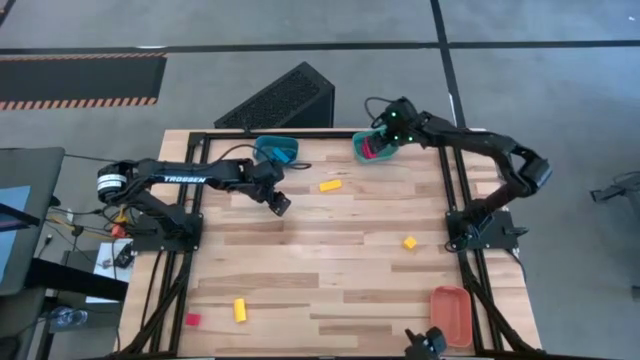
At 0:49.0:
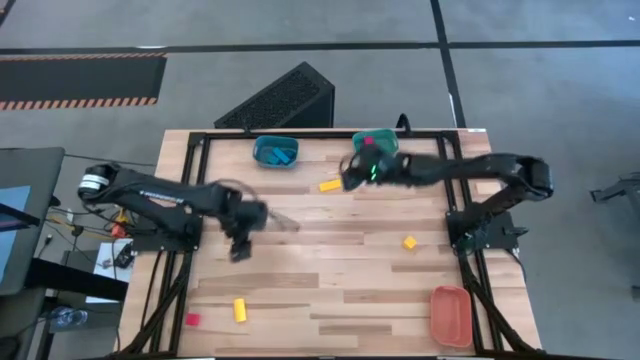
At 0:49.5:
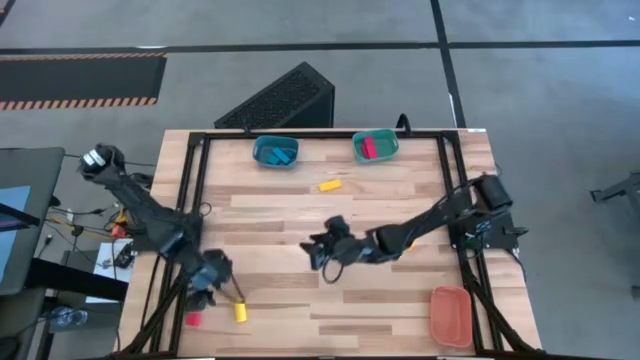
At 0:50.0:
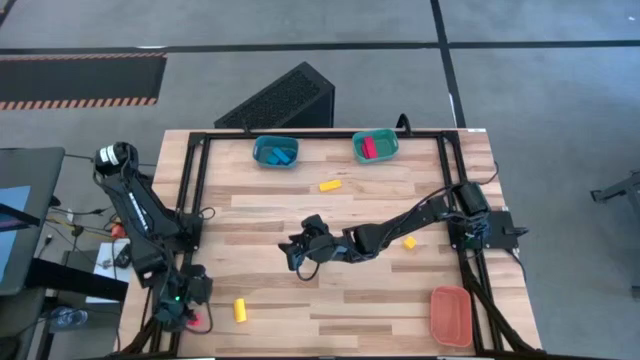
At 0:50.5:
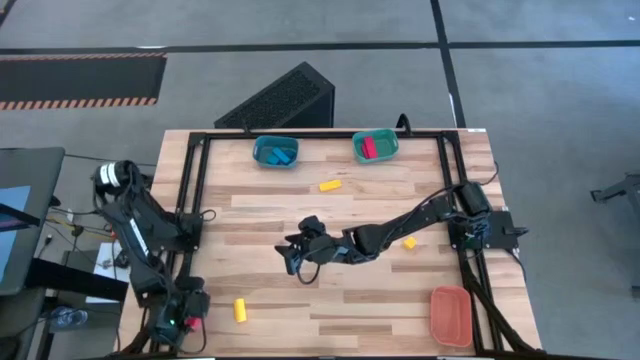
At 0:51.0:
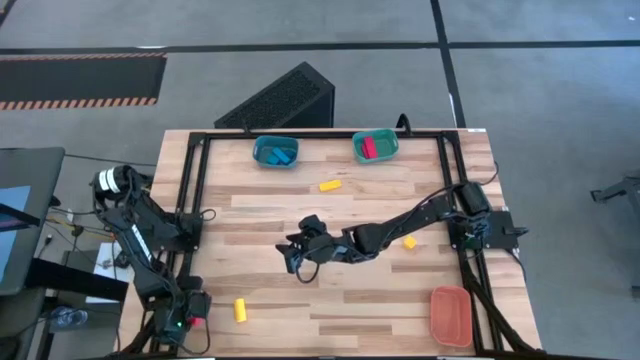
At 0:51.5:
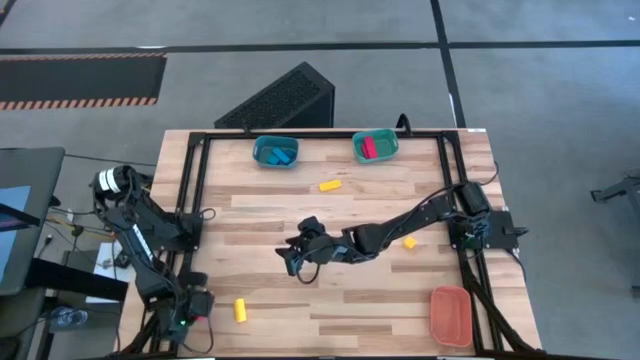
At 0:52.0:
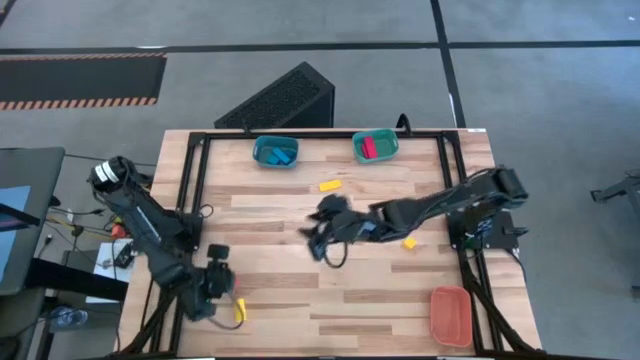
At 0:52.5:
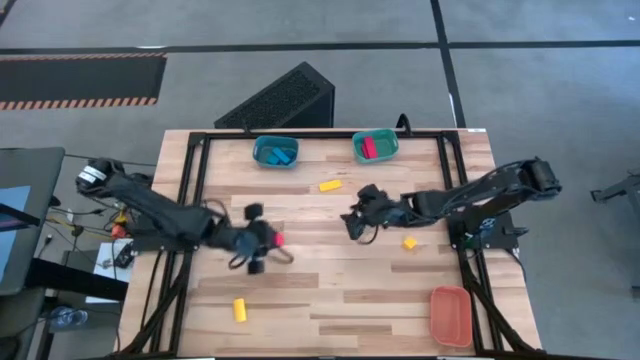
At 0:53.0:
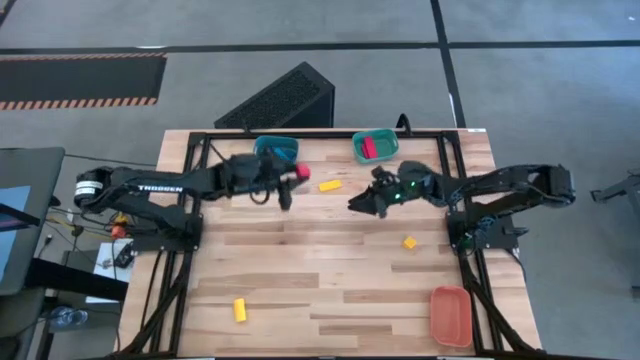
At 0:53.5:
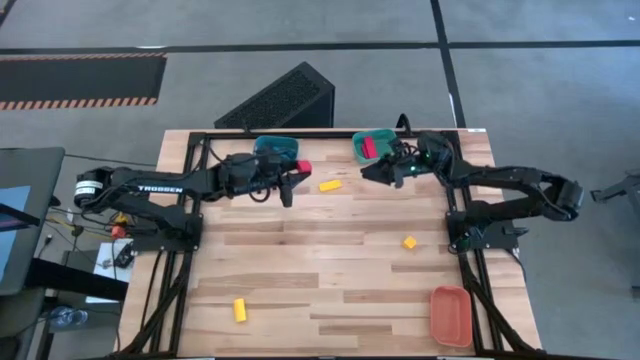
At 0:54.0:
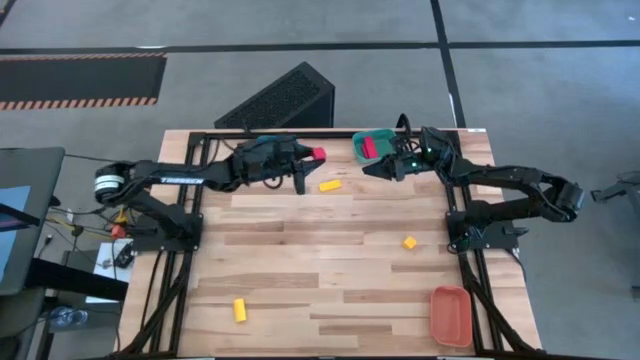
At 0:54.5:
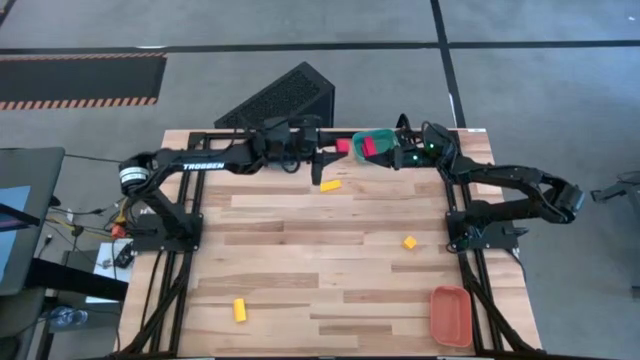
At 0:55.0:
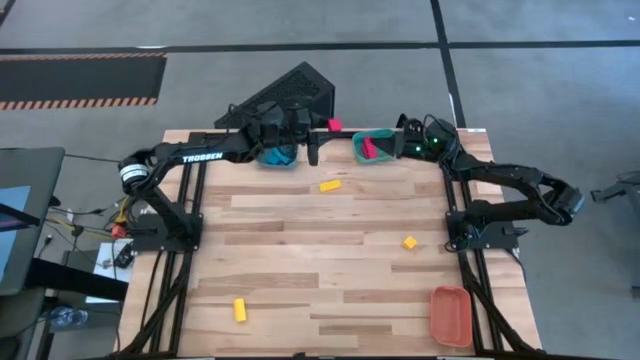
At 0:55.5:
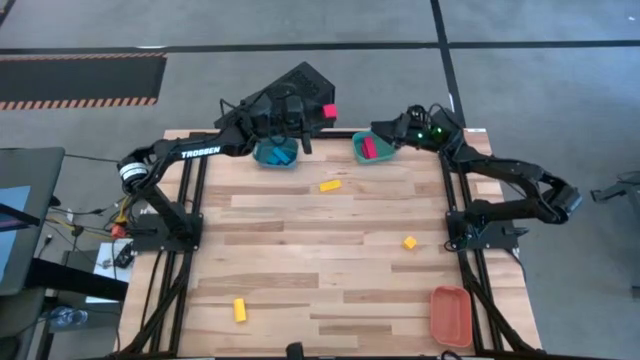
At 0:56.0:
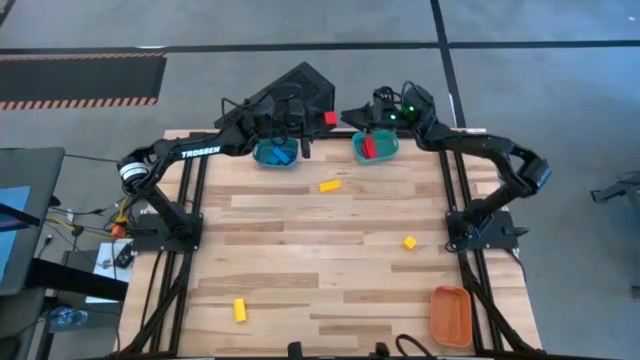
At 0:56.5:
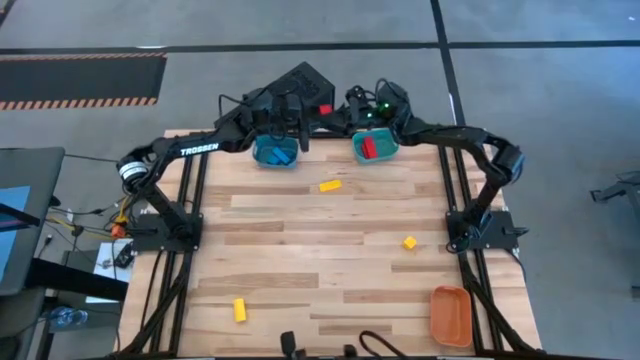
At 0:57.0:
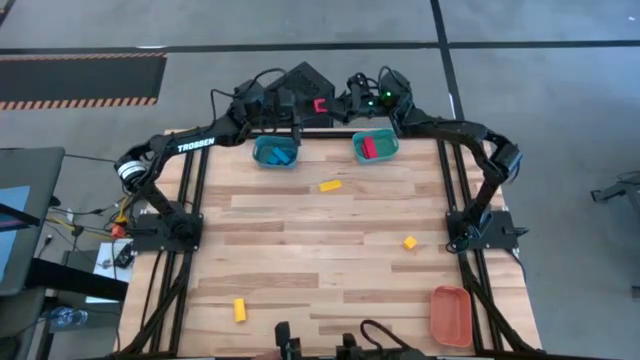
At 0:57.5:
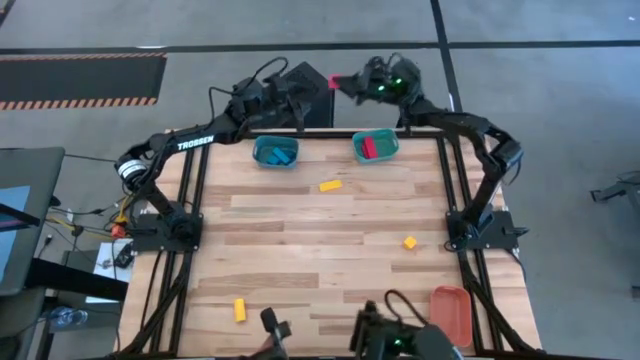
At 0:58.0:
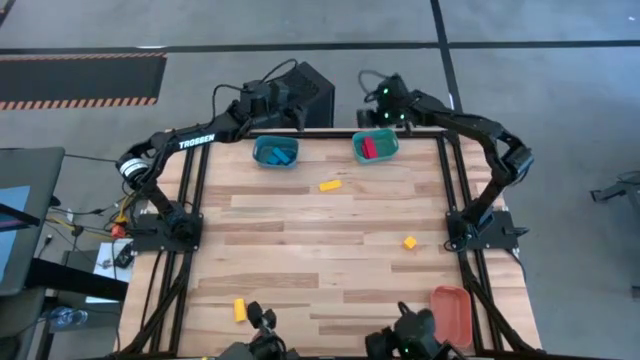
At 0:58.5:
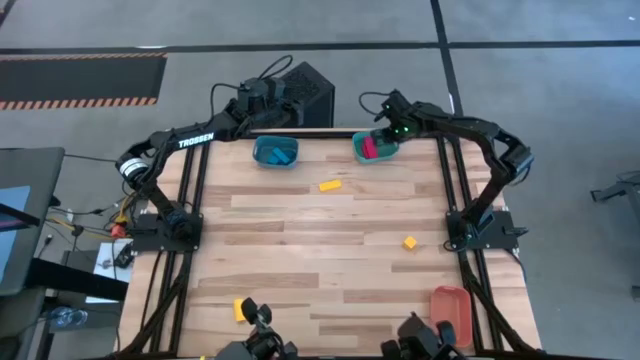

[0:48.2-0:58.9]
Task: Sort & place blocks by color
Put the red block into the green bin

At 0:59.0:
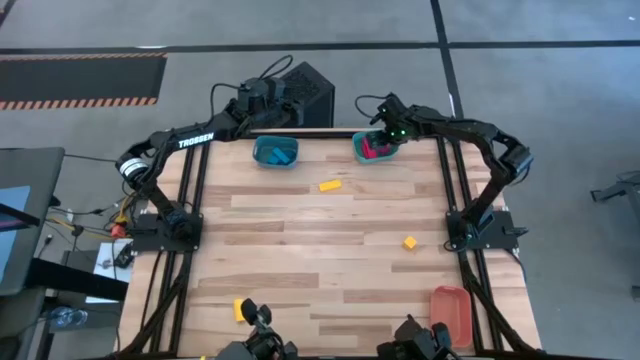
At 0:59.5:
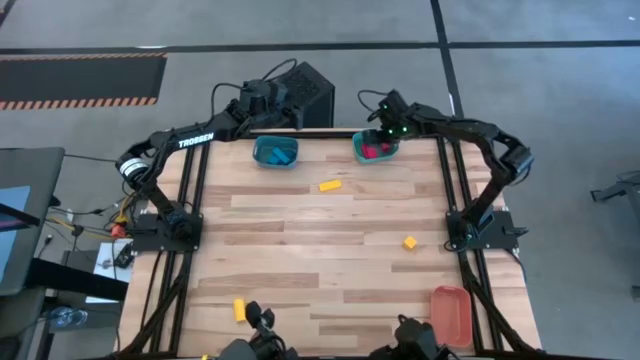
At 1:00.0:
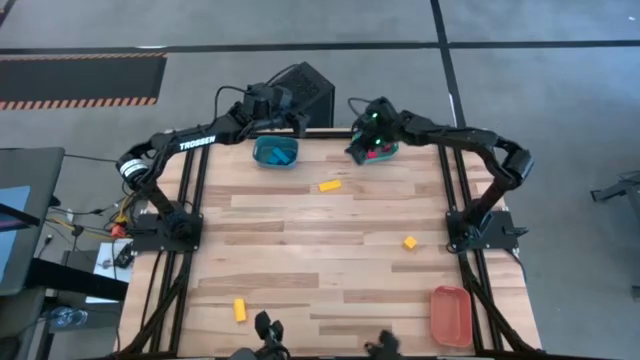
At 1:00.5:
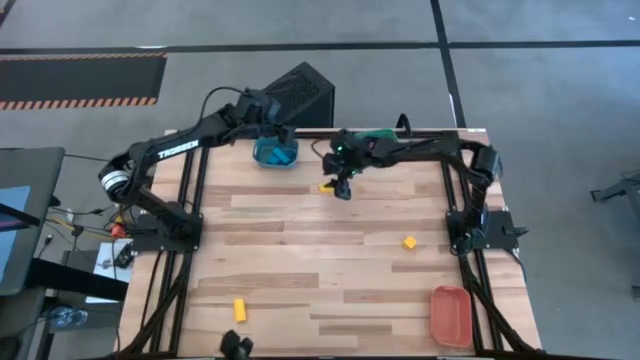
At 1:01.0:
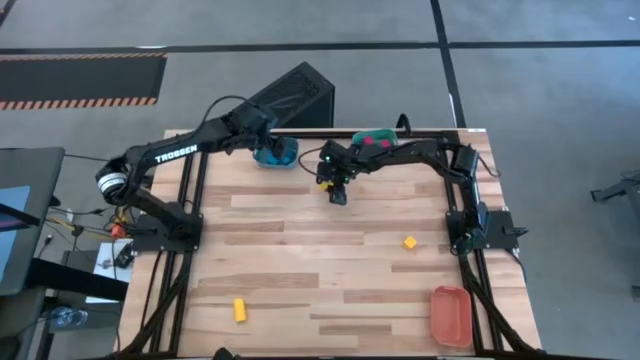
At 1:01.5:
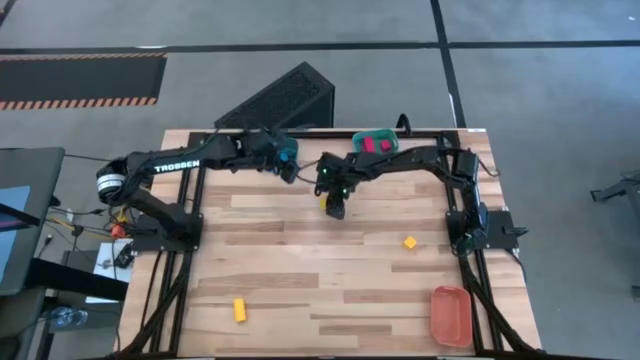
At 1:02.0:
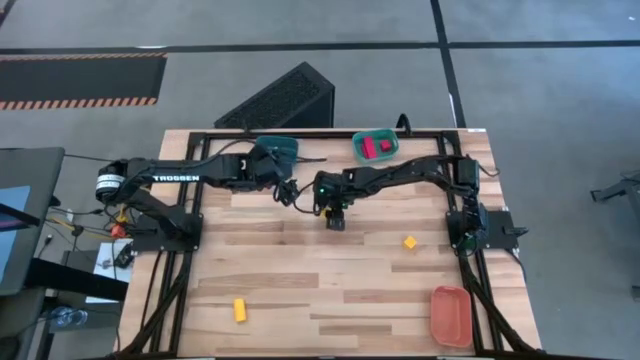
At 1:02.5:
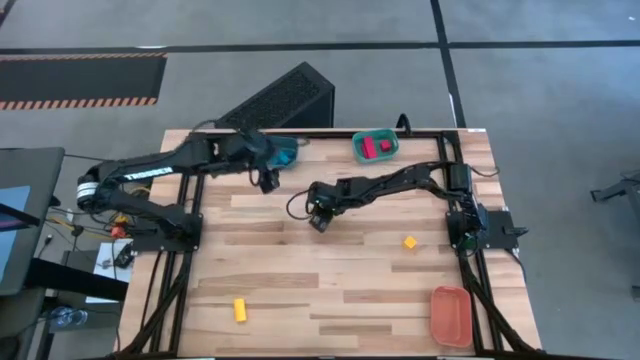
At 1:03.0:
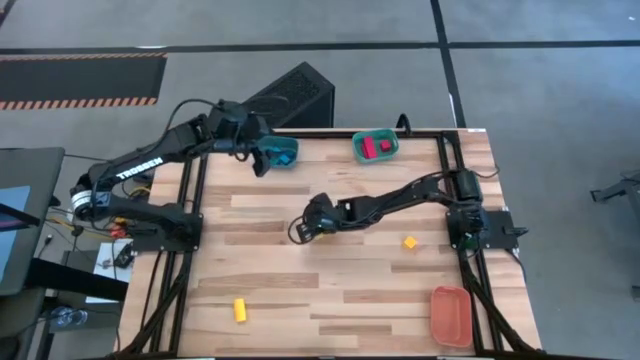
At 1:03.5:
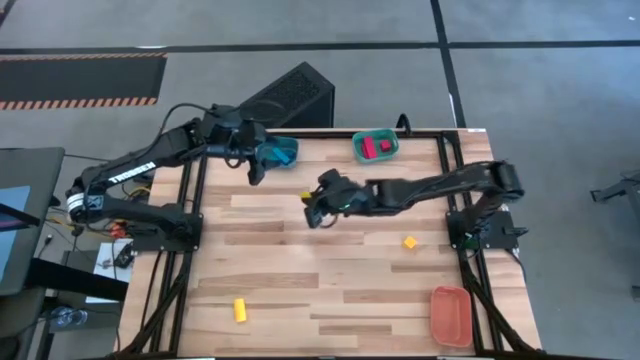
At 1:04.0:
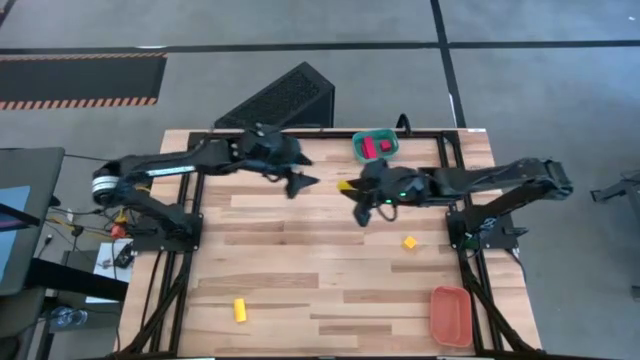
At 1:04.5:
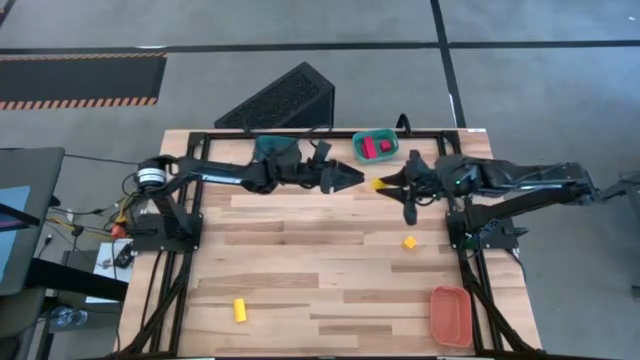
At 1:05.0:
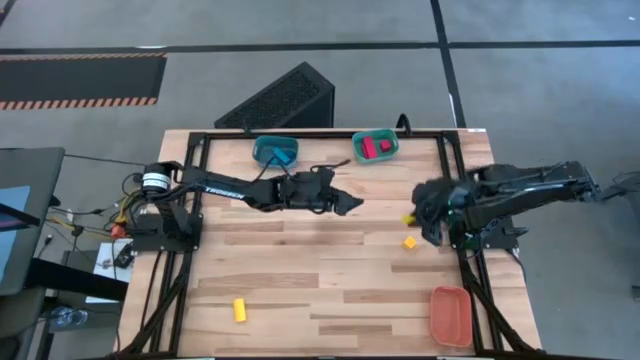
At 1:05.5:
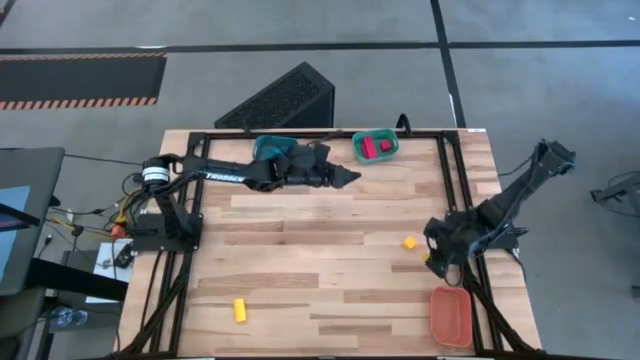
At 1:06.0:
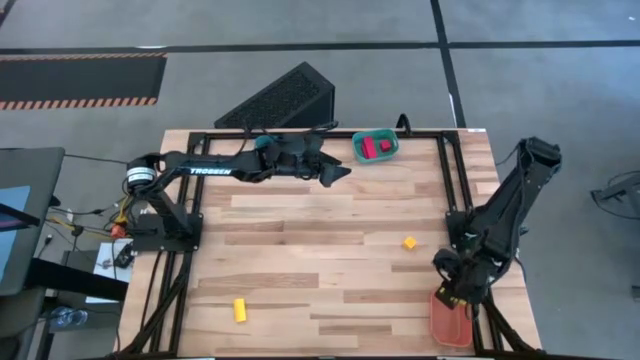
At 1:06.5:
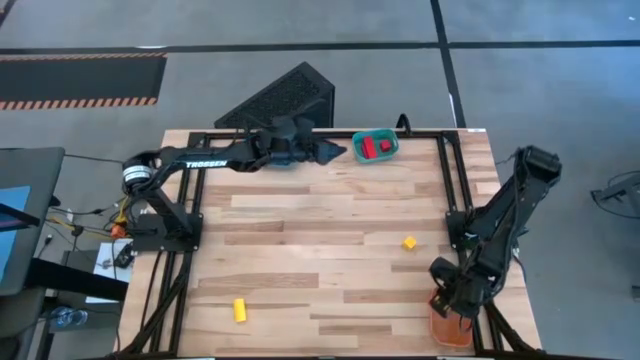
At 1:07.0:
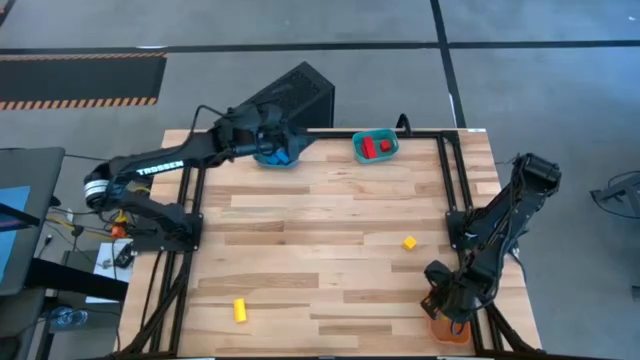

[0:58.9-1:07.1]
Put the top yellow block into the orange bin

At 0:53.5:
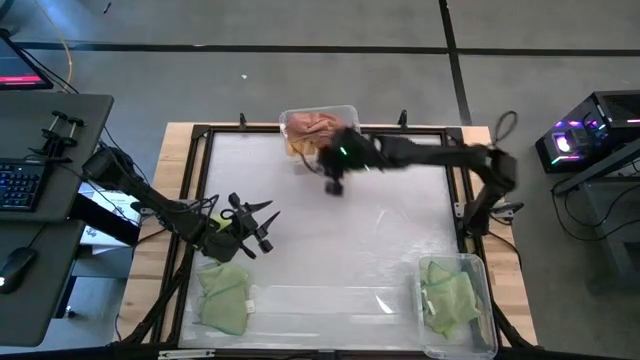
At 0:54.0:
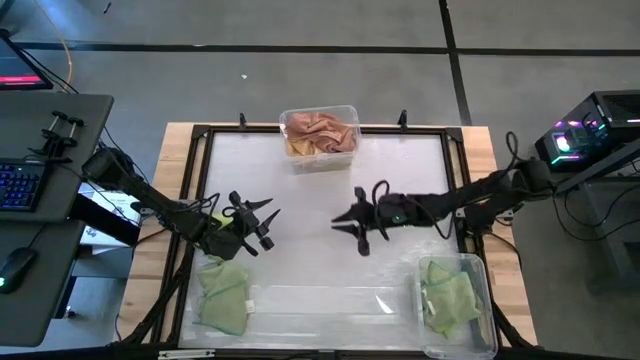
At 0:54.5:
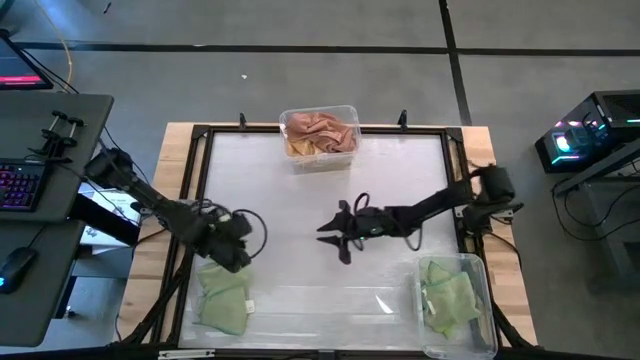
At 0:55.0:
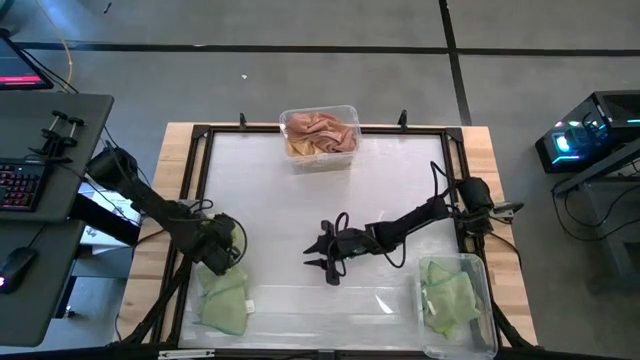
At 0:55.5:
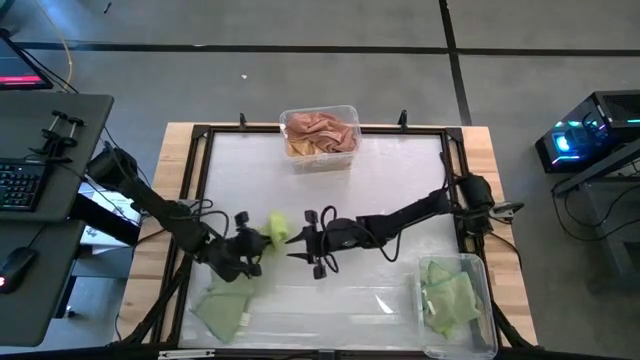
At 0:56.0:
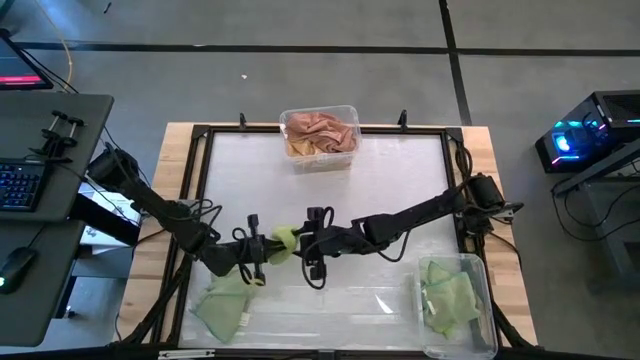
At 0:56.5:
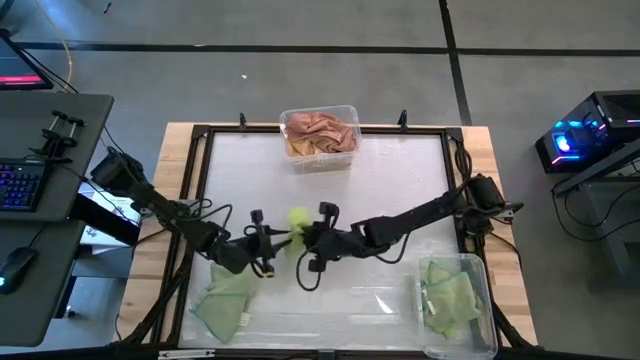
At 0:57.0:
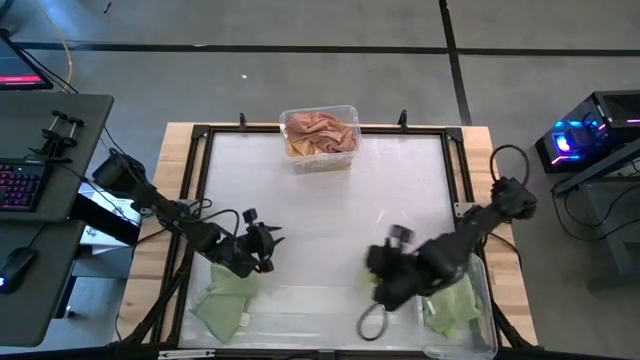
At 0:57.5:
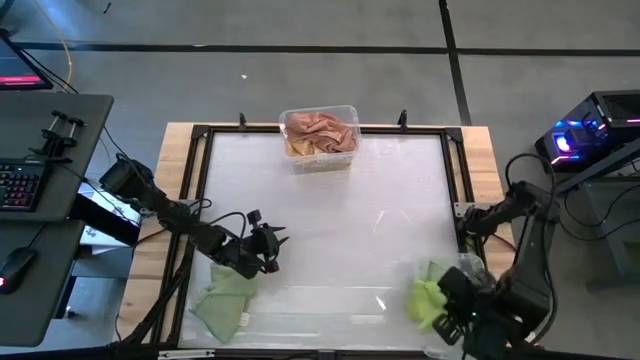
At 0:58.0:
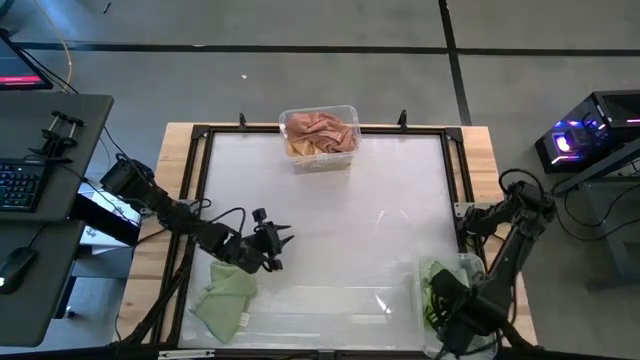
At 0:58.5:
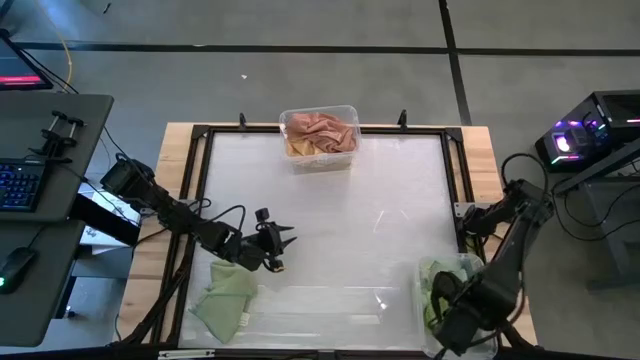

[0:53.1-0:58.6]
Task: Sort towels by color in basket
Put the light green towel into the bottom transparent bin
